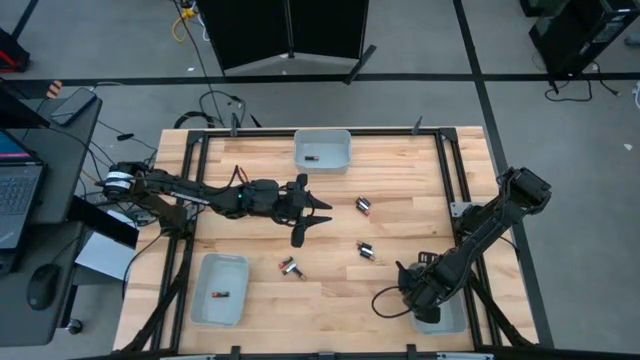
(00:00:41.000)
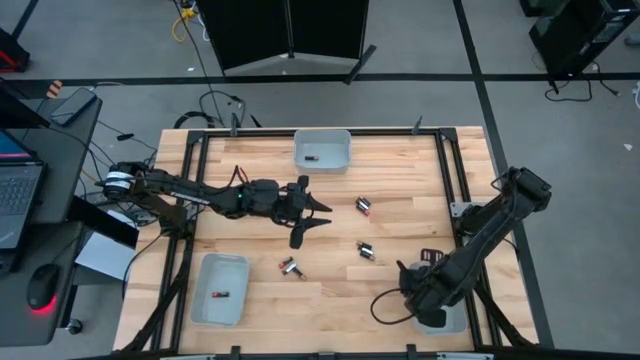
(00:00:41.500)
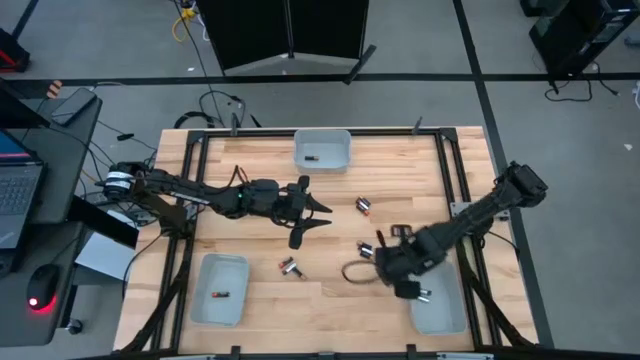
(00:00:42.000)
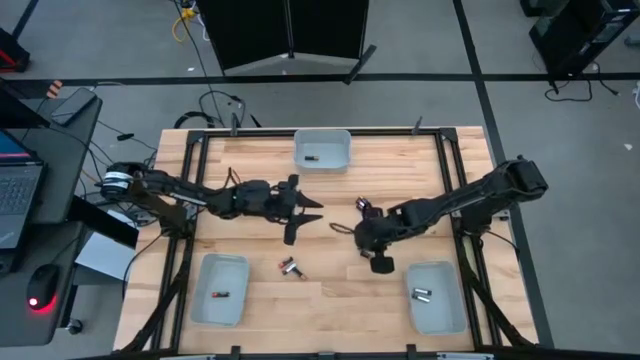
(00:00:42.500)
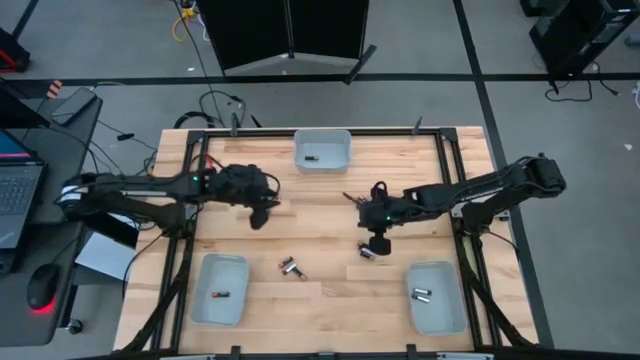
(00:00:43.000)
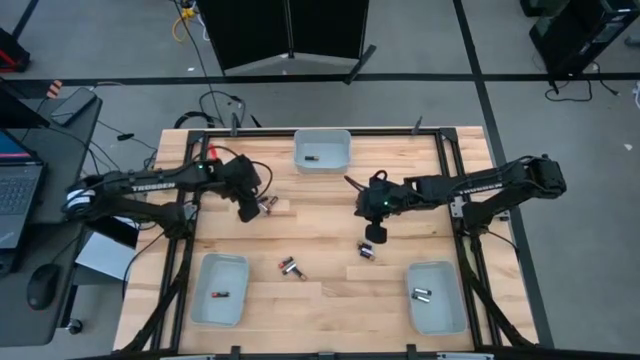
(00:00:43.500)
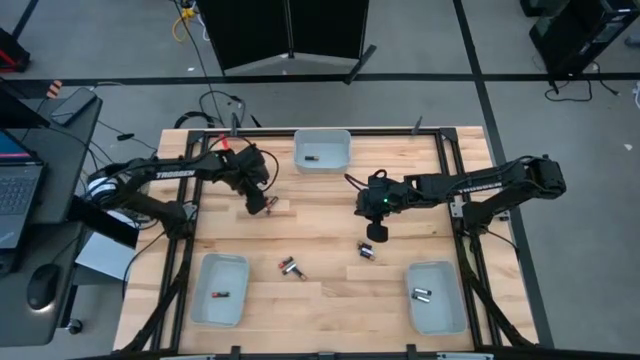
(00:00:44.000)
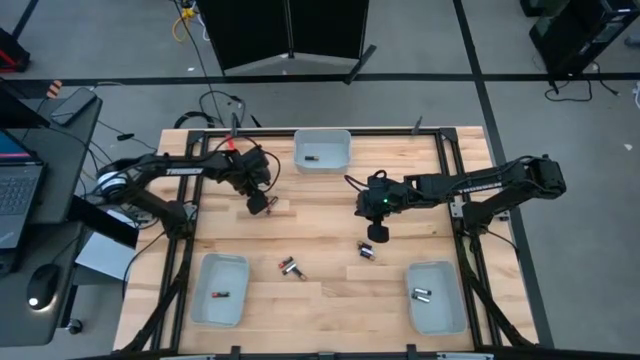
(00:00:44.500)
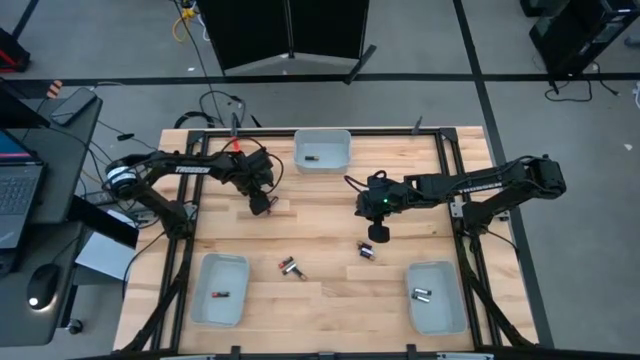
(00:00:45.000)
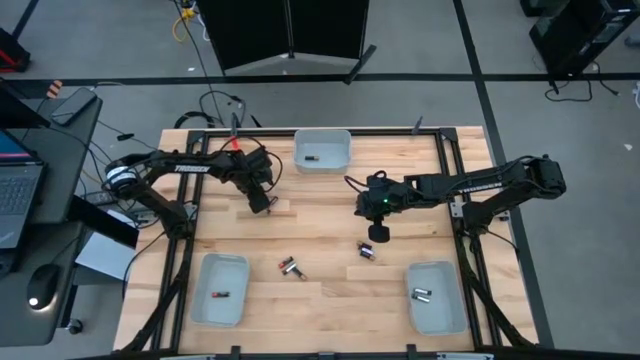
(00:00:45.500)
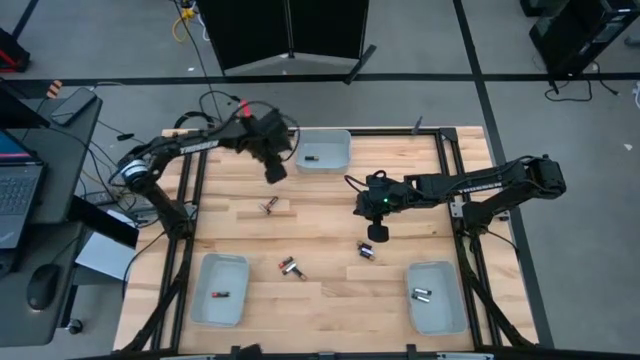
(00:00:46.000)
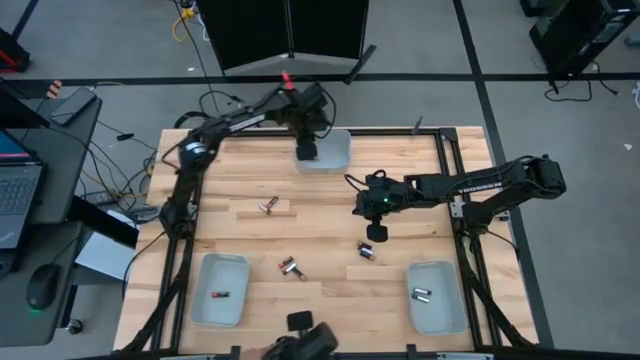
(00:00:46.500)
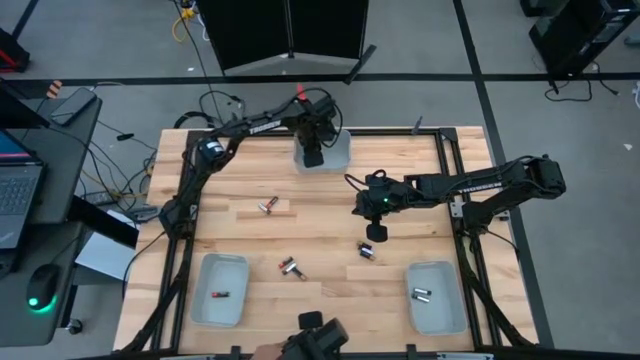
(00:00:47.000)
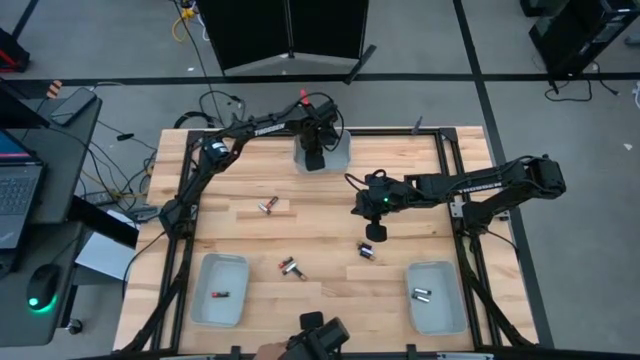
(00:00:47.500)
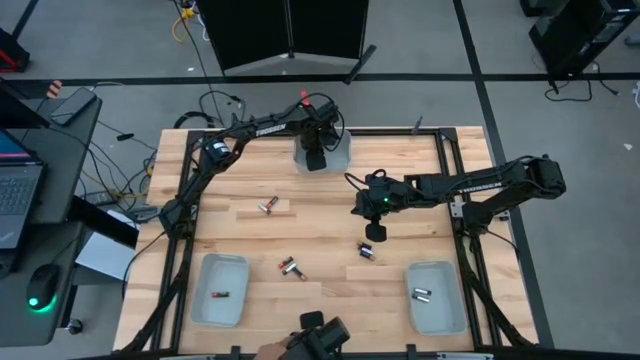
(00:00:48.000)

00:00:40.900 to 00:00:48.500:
Task: Sort batteries
Put the copper battery into the top gray bin

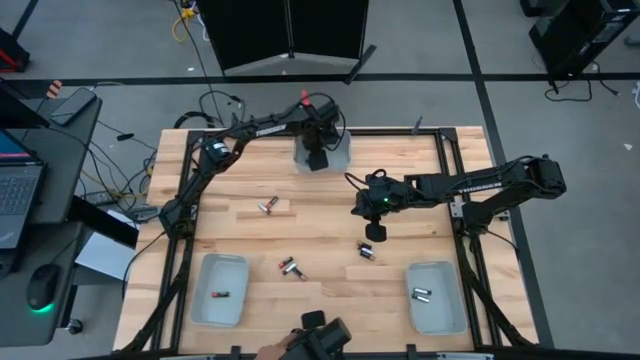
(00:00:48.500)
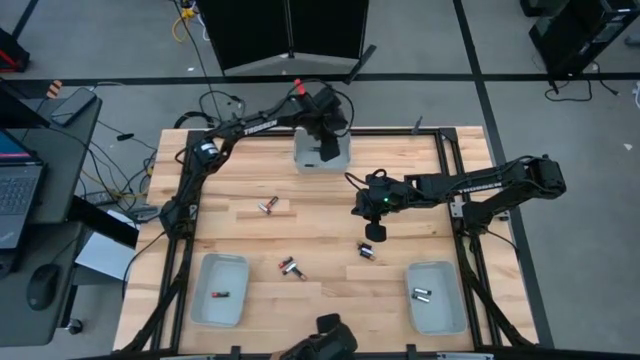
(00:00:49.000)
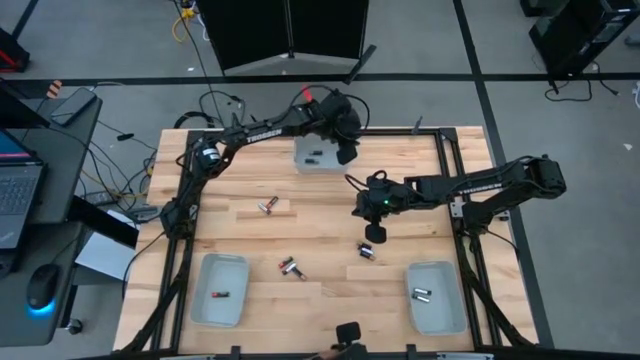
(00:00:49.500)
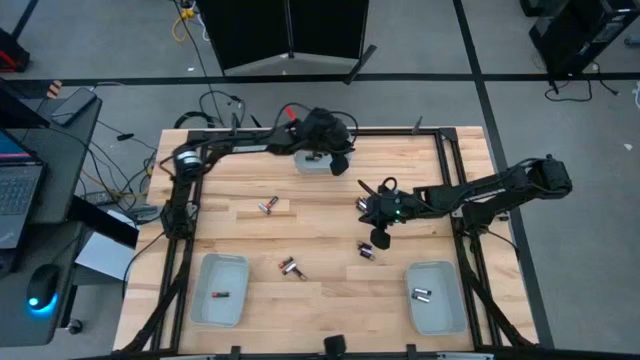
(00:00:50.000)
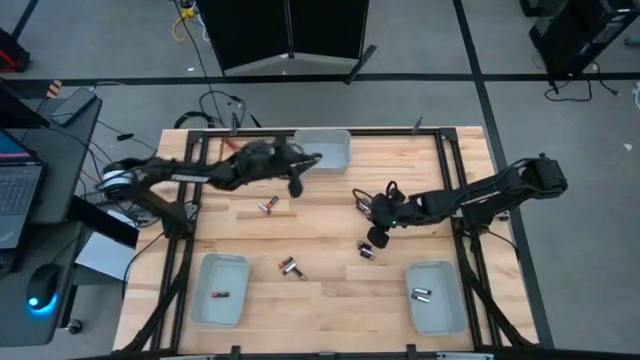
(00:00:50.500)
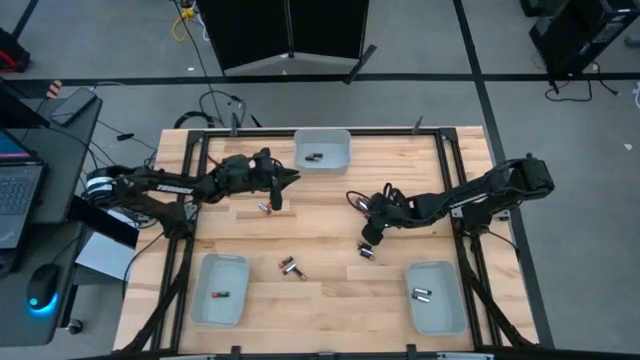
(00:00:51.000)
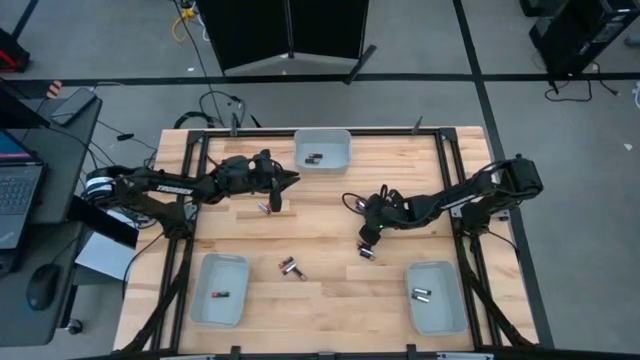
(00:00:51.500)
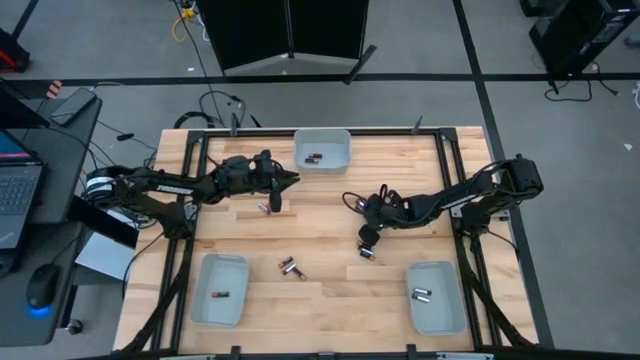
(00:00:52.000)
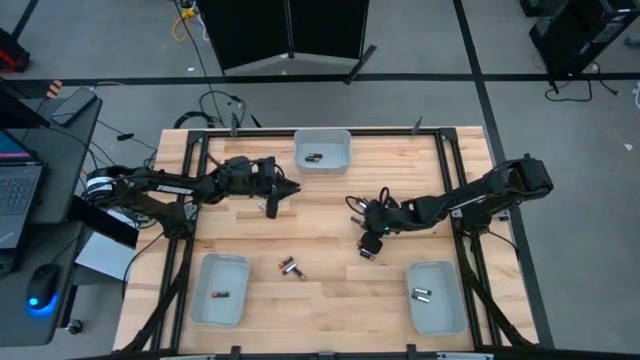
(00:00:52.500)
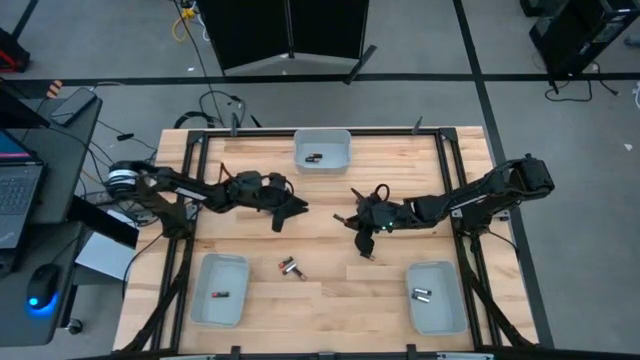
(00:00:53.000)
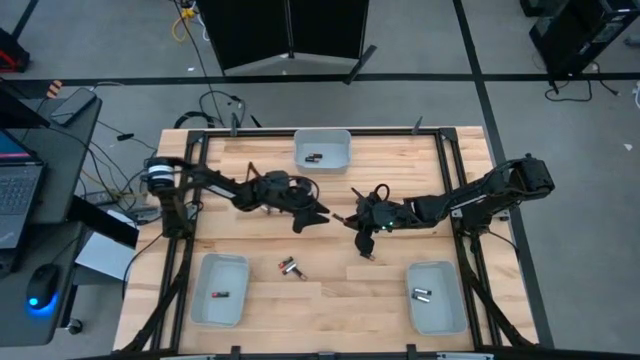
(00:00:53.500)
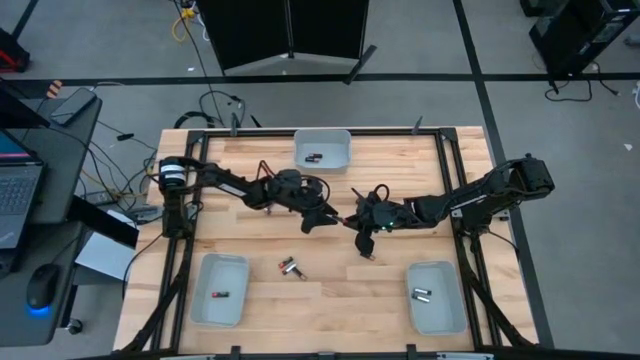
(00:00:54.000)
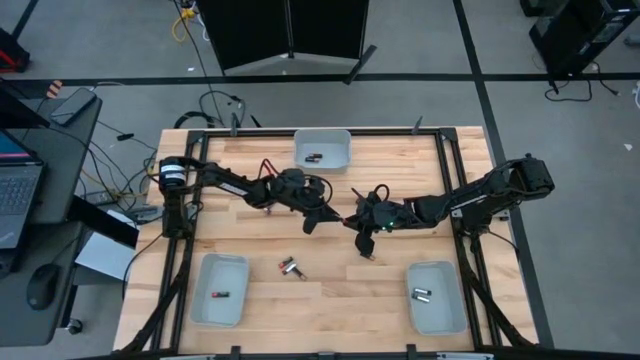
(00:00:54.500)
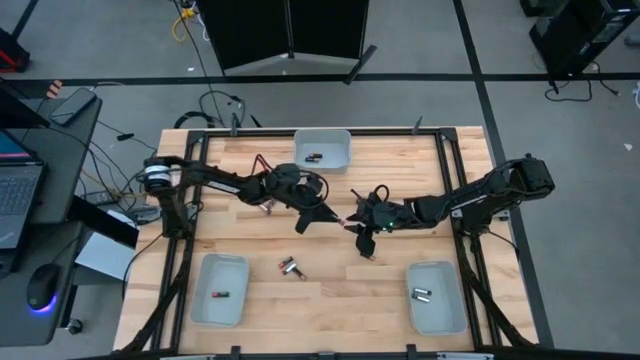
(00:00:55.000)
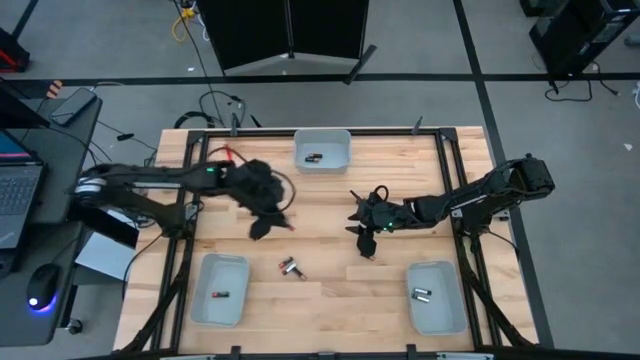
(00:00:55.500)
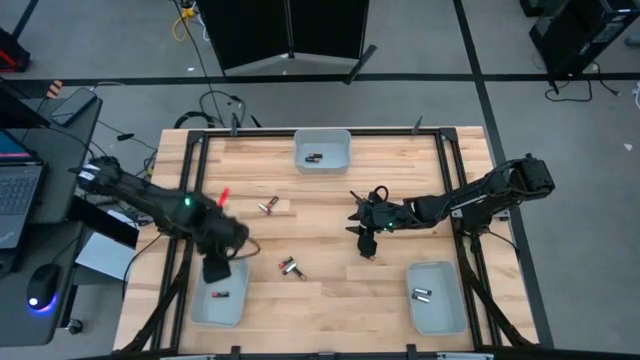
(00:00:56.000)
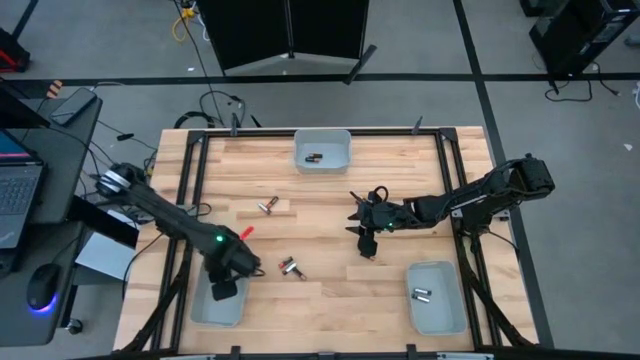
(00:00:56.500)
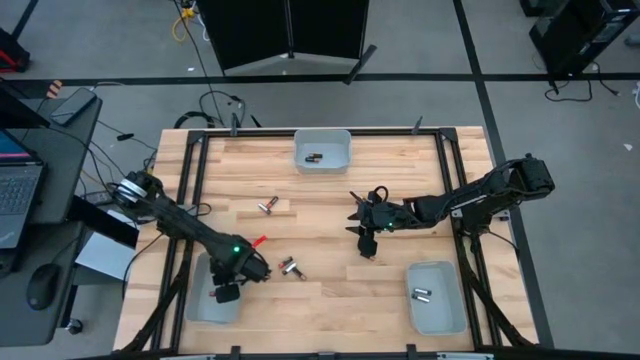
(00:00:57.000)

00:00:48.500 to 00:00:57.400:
Put the red battery into the bottom left gray bin

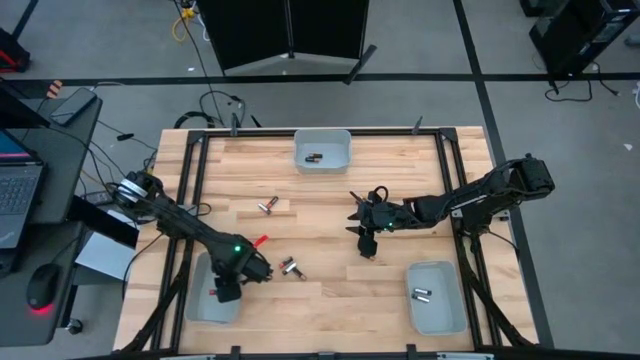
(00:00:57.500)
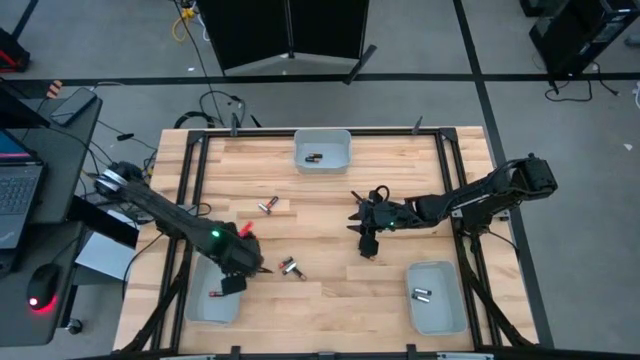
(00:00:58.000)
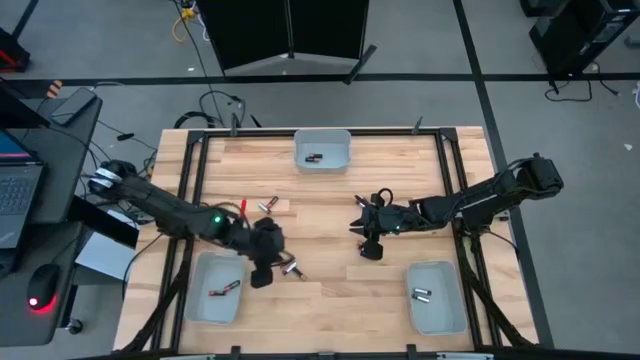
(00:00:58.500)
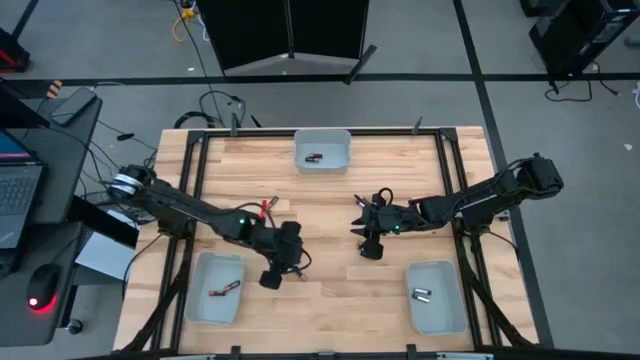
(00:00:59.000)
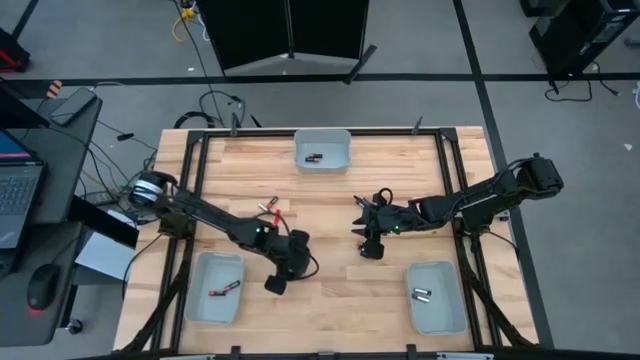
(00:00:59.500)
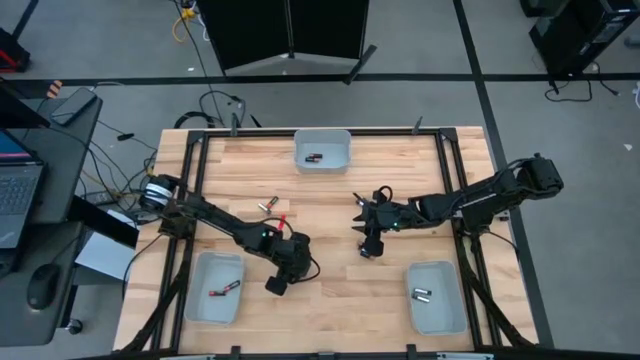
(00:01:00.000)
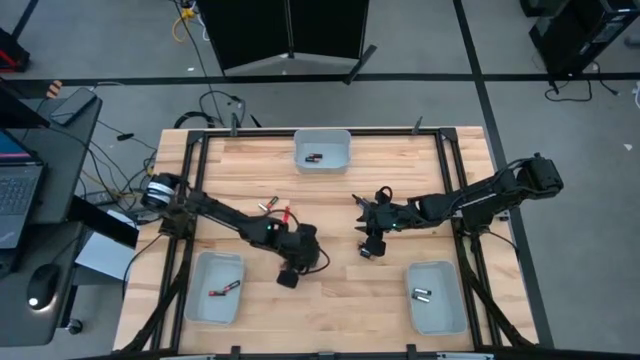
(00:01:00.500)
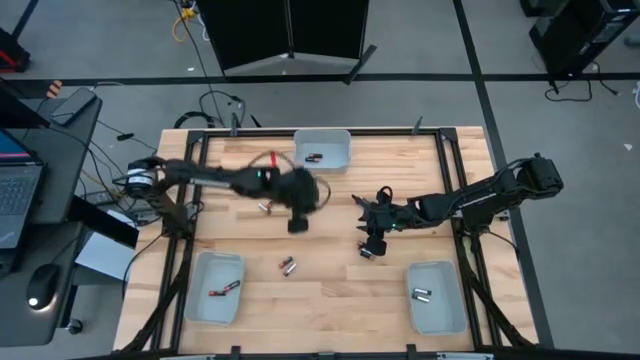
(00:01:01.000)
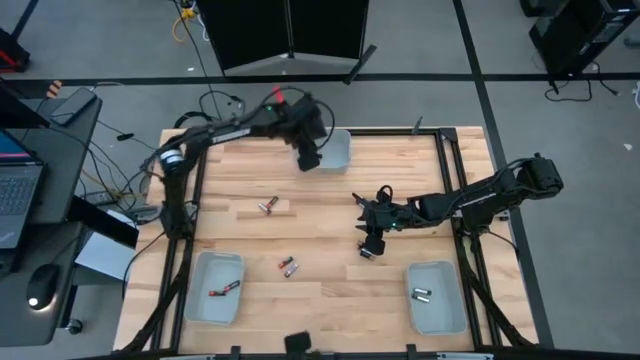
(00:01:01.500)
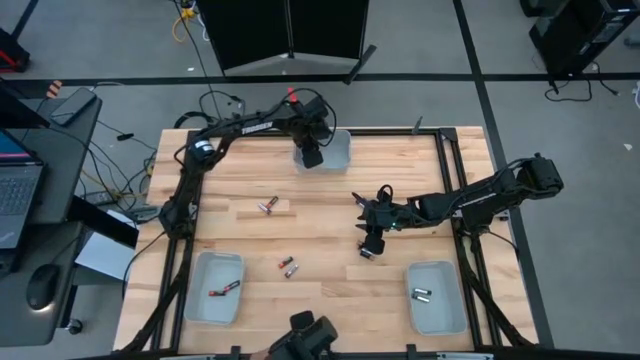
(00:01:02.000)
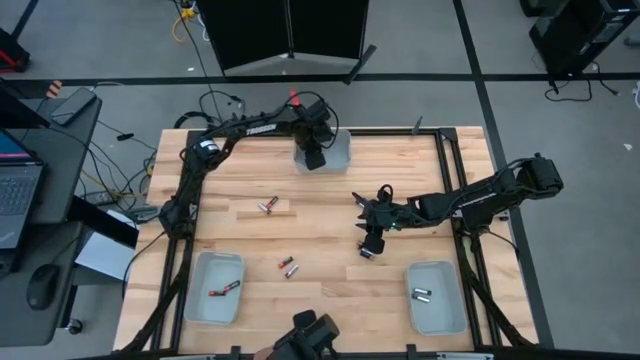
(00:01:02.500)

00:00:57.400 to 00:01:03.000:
Put the copper battery into the top gray bin
